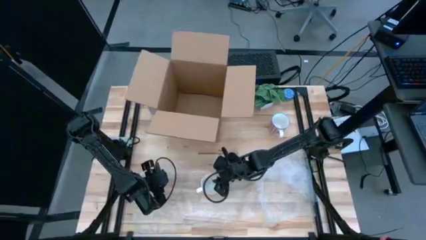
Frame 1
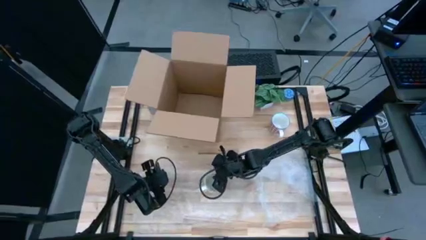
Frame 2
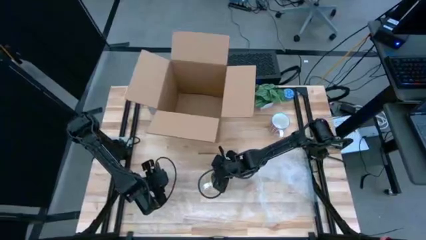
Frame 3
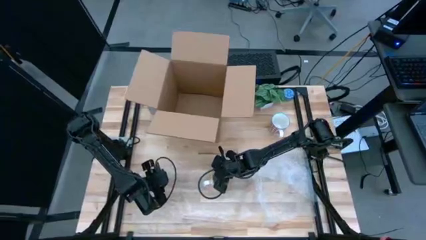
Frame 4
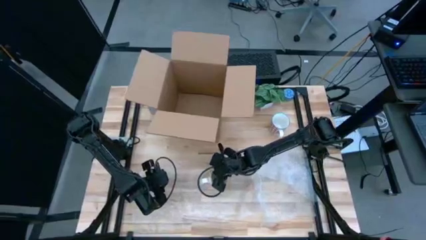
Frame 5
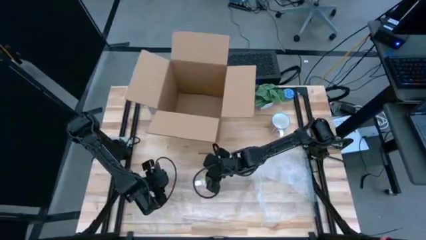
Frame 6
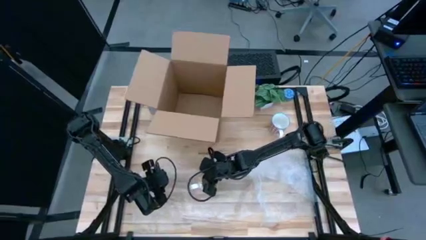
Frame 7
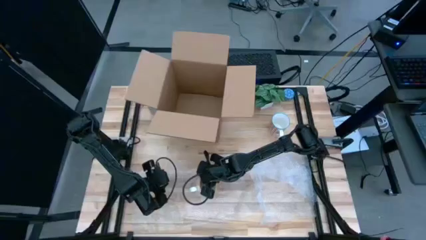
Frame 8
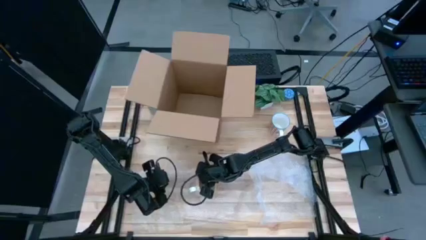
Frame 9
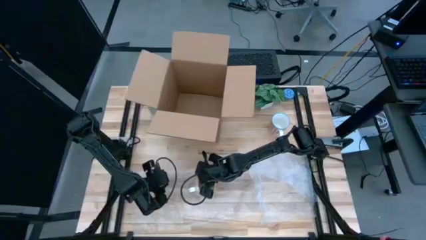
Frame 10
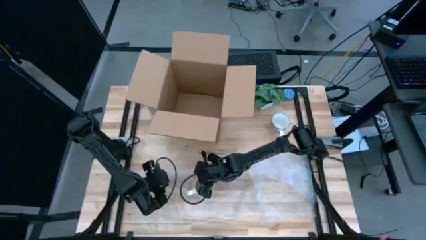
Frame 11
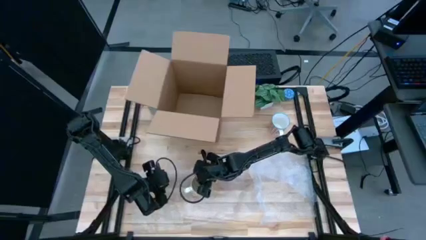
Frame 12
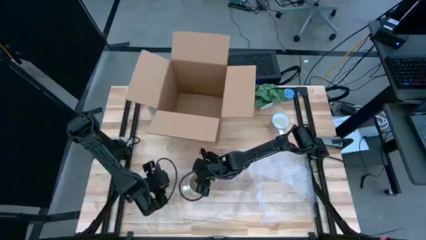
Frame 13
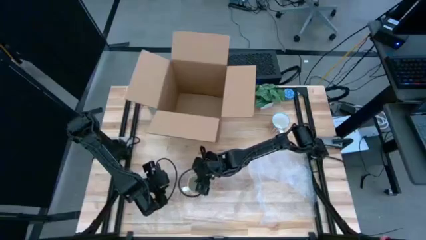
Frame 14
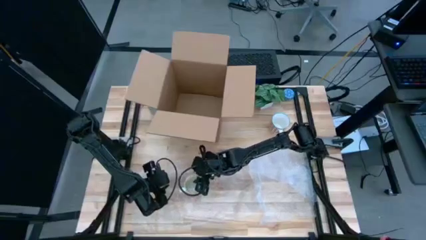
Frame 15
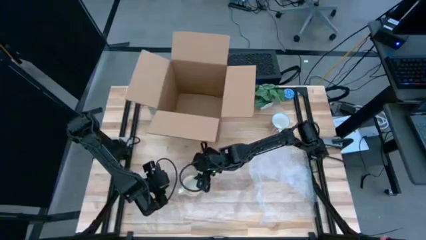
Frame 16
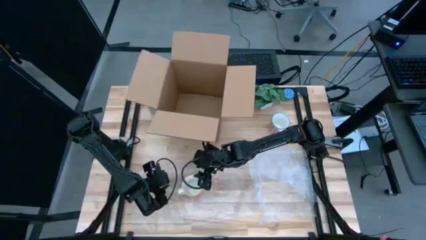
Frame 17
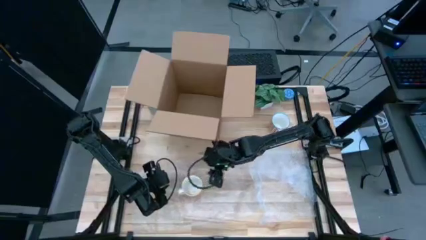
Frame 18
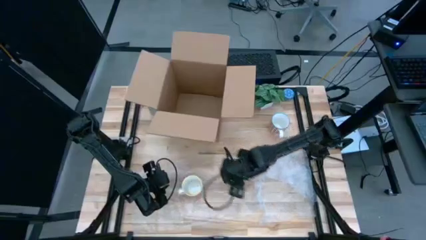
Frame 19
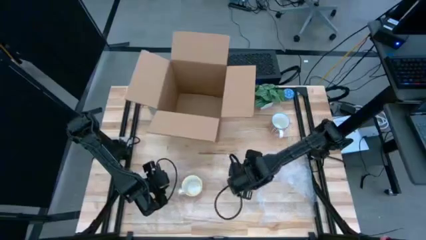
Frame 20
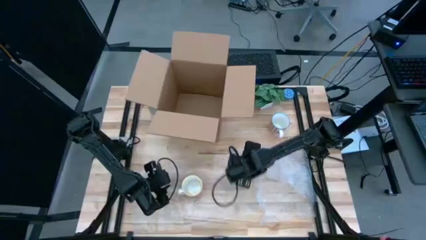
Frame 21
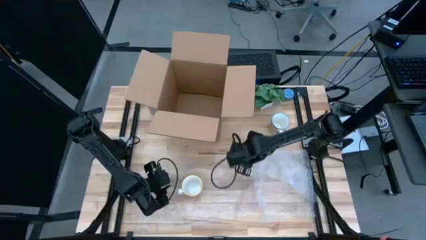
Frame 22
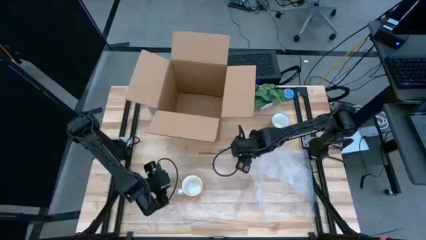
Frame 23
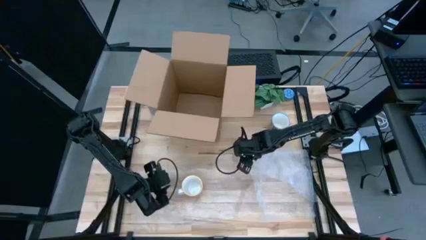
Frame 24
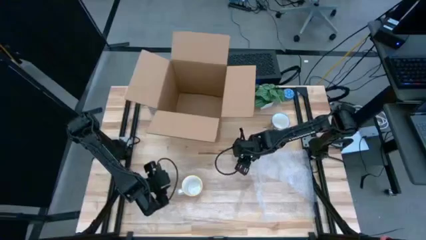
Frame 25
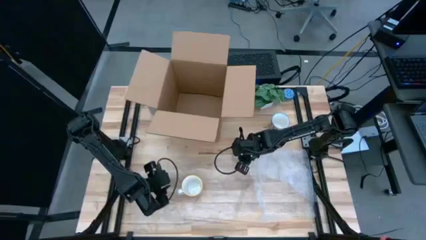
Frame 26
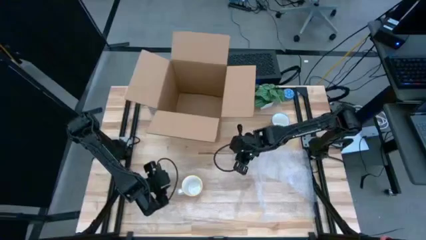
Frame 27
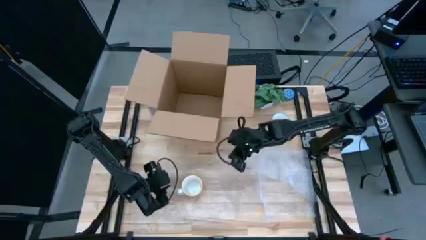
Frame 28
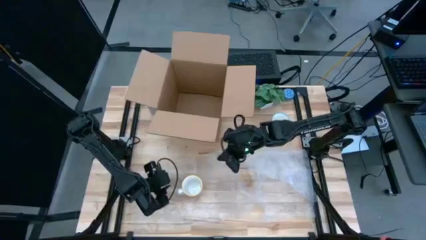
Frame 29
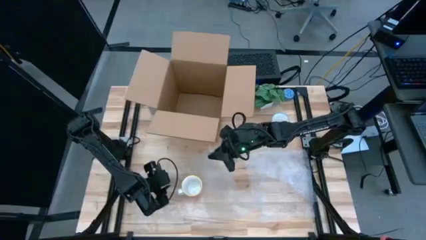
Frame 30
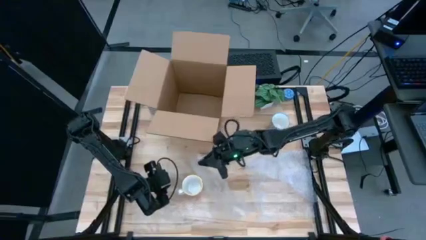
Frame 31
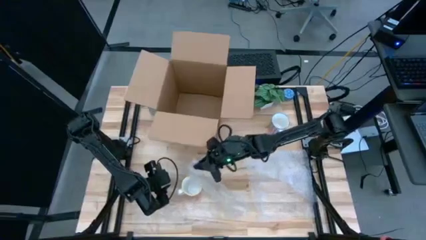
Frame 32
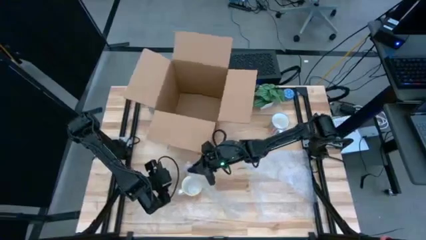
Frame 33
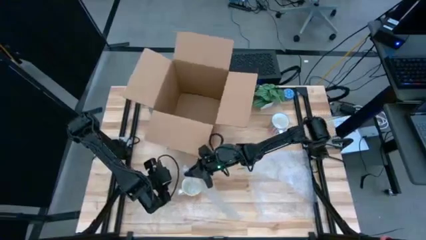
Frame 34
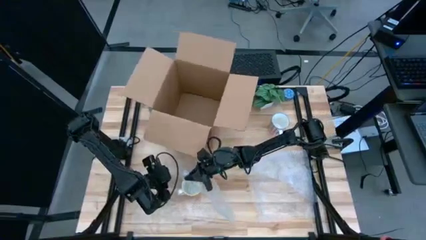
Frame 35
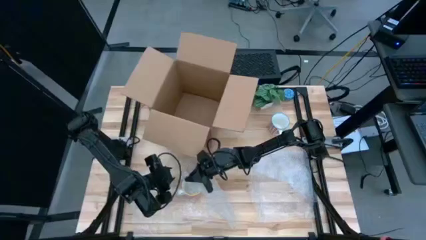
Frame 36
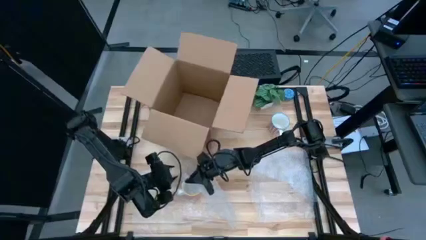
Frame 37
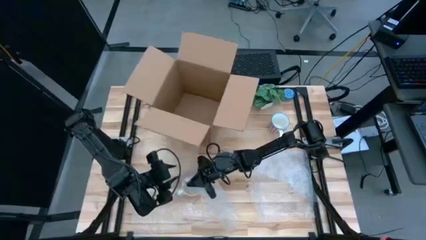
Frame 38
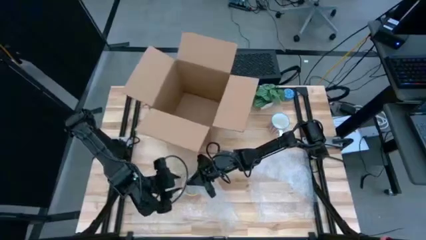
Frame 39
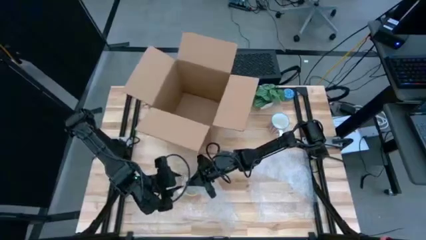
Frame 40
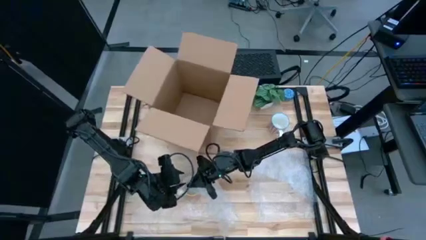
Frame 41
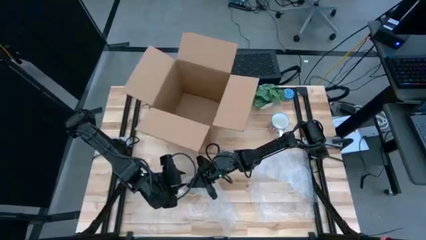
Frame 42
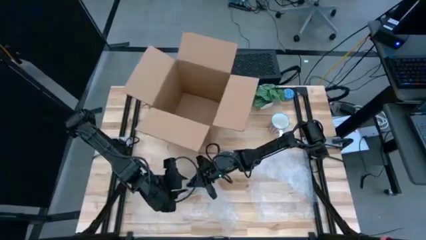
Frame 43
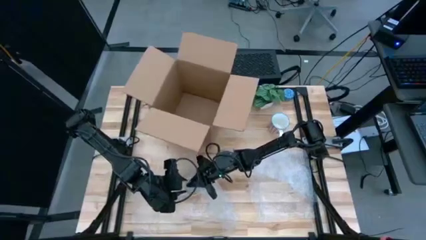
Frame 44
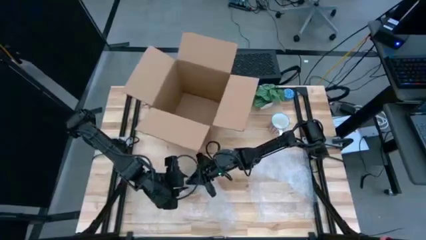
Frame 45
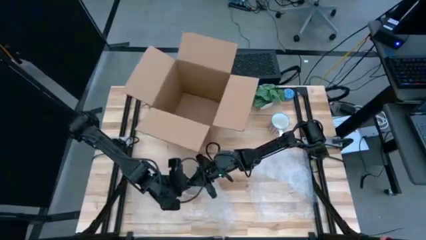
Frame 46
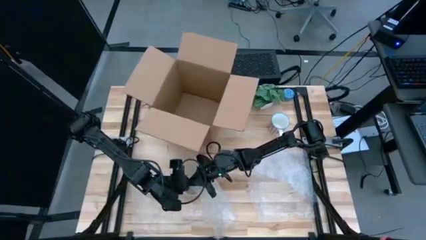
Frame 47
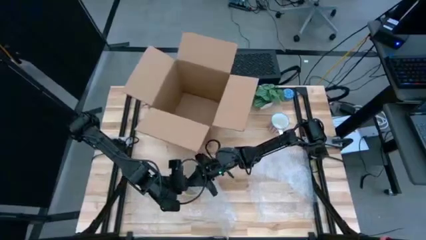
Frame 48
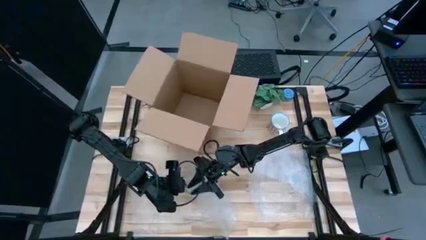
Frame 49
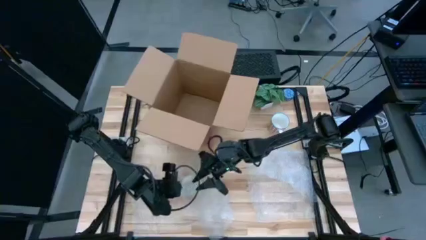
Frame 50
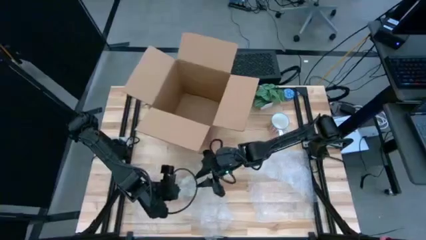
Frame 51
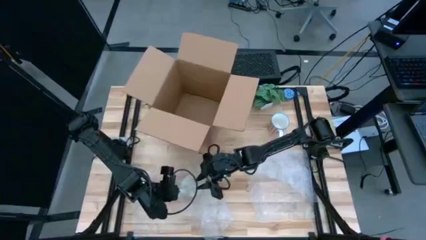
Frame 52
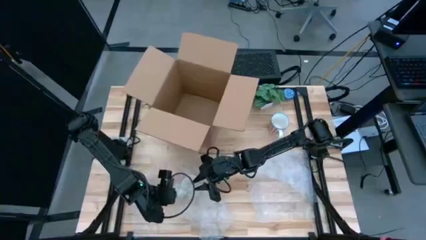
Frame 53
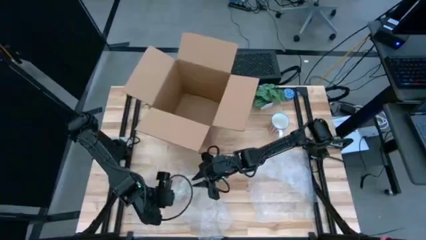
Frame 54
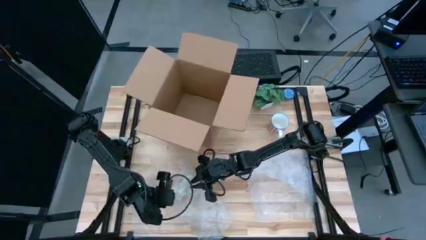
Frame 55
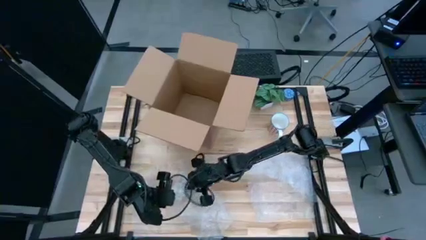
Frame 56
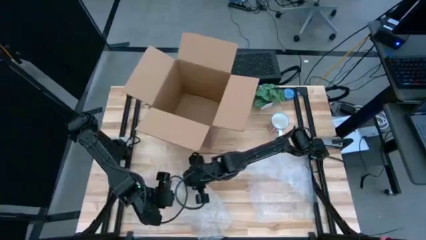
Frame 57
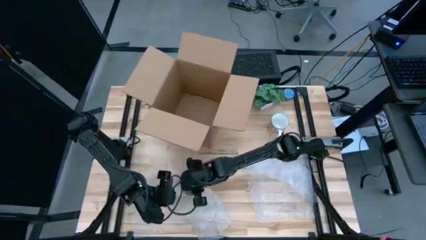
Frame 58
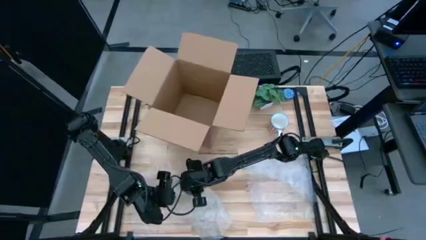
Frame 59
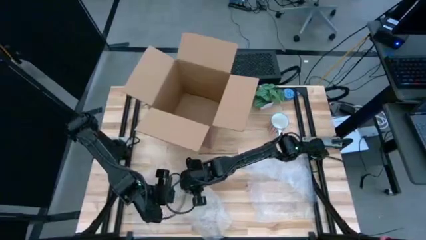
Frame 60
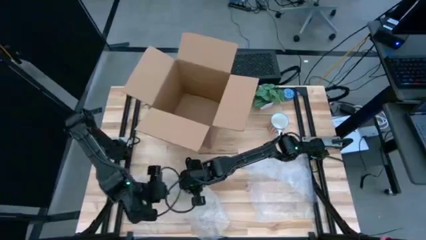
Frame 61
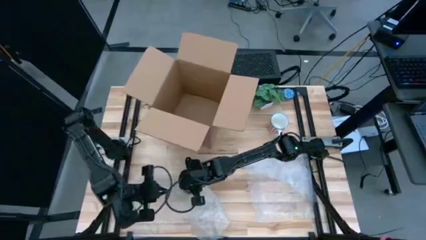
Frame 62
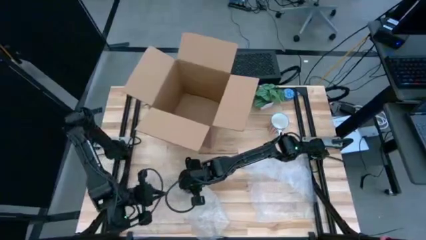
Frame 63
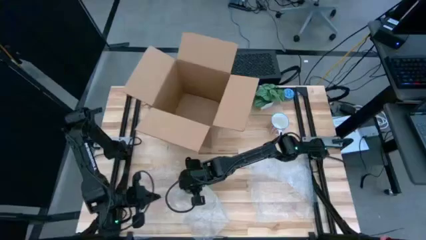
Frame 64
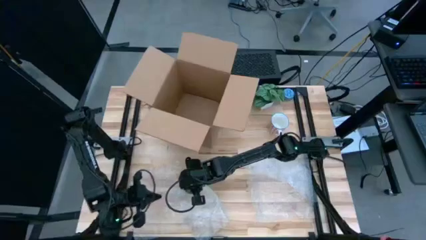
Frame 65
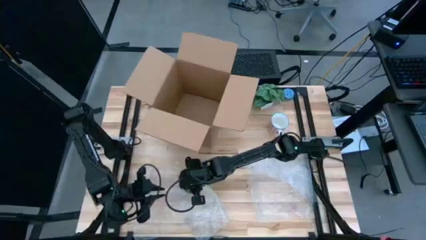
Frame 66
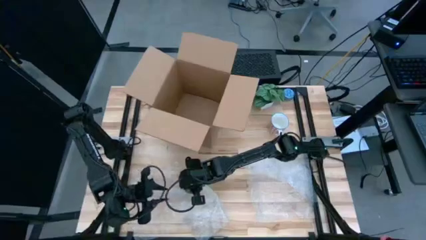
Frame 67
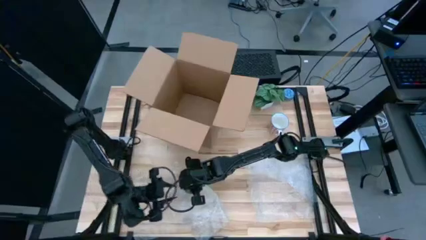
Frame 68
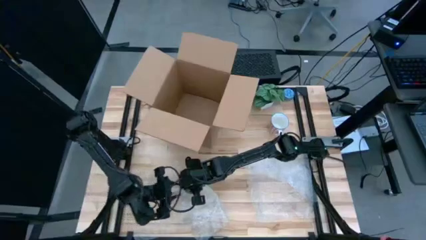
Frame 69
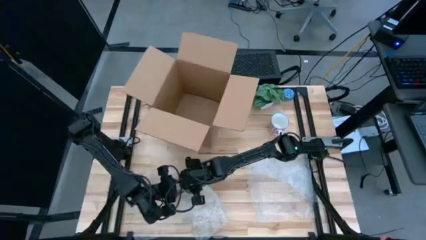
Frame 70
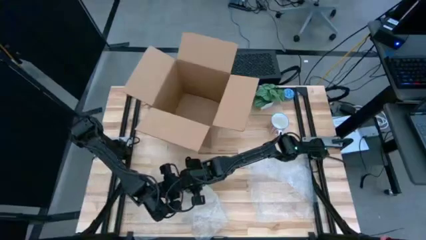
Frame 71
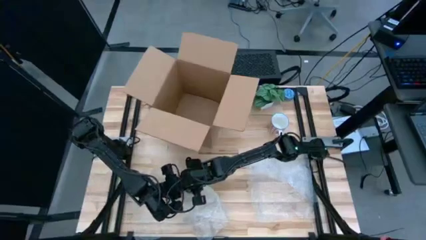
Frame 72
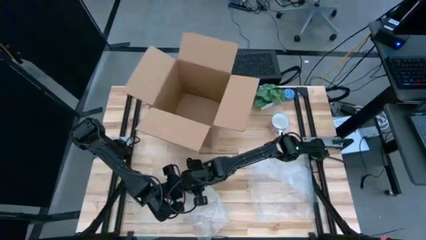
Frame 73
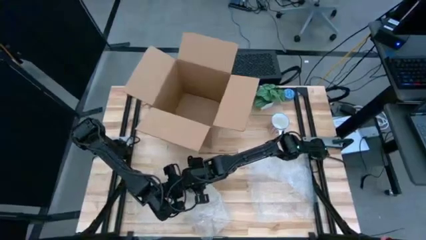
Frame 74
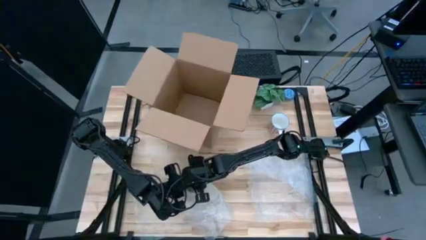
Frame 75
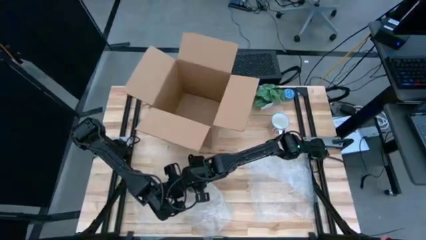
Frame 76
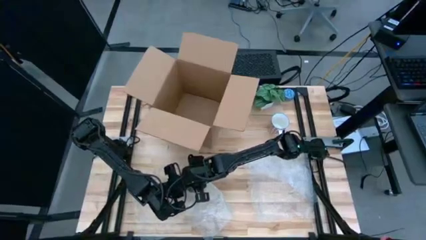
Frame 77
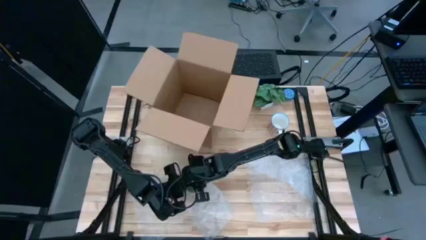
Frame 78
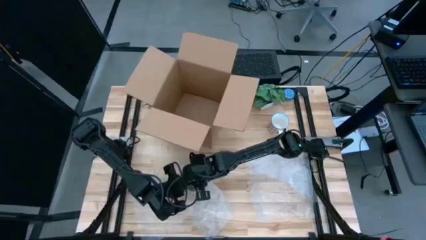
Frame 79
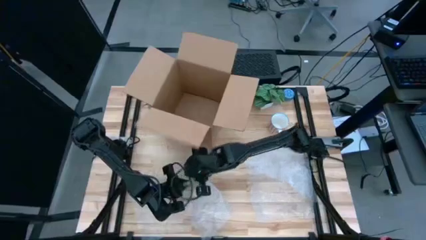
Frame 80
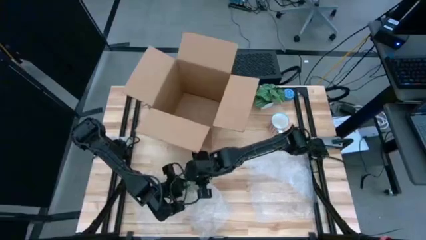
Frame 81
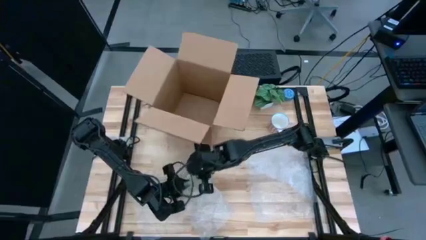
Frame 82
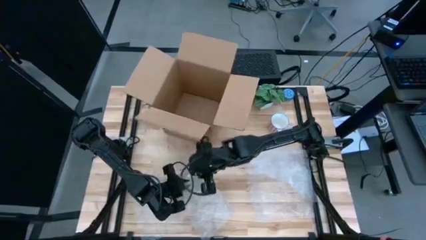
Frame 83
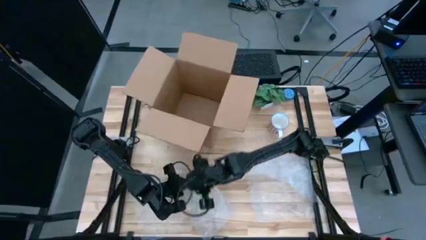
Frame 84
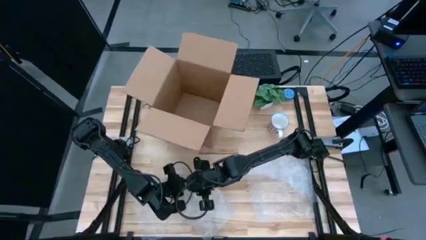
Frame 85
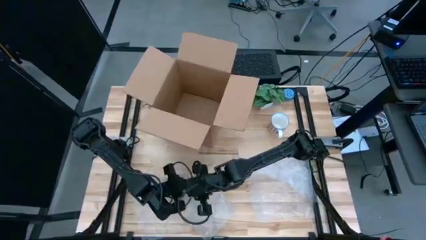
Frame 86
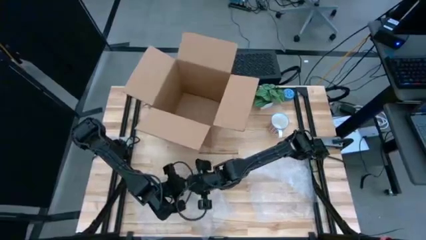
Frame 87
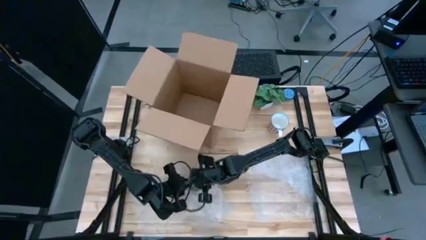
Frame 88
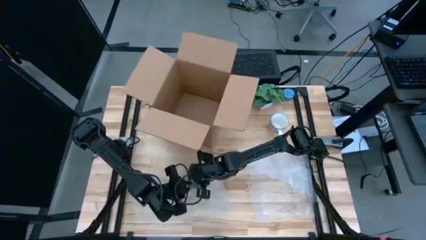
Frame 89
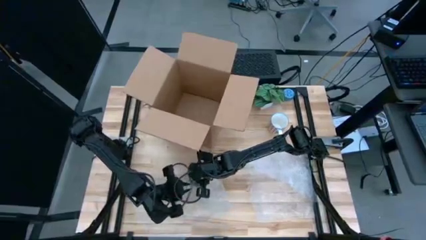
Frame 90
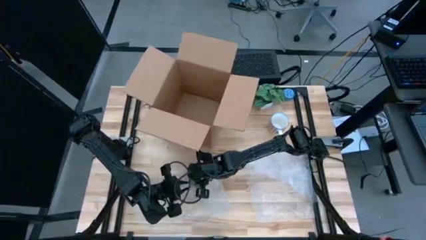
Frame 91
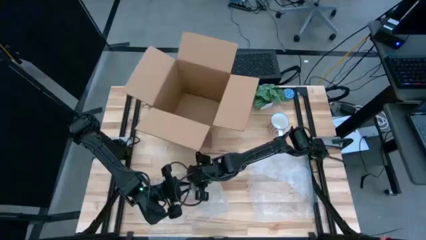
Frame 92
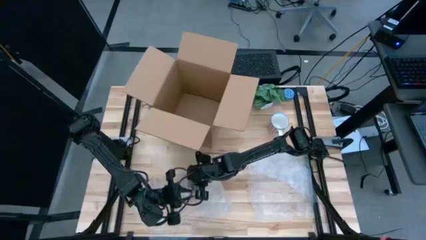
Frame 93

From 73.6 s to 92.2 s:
Task: wrap mug
Wrap the yellow mug with bubble wrap
